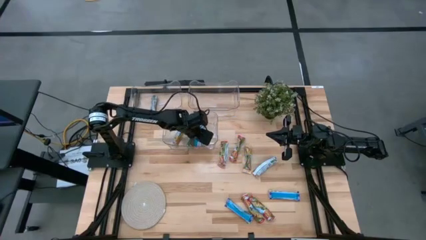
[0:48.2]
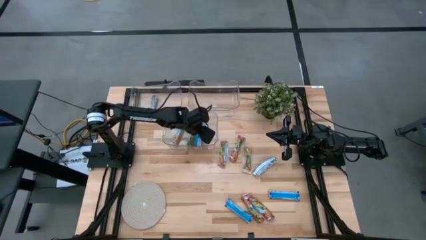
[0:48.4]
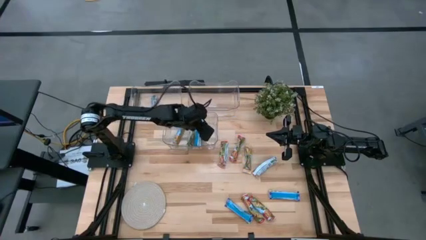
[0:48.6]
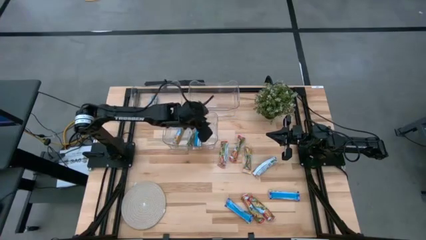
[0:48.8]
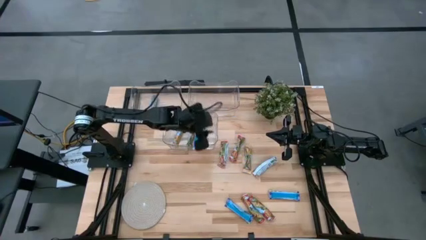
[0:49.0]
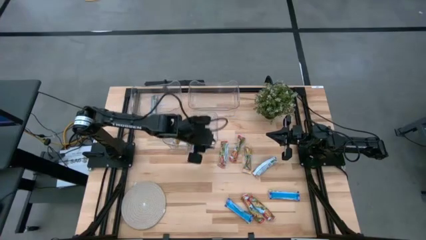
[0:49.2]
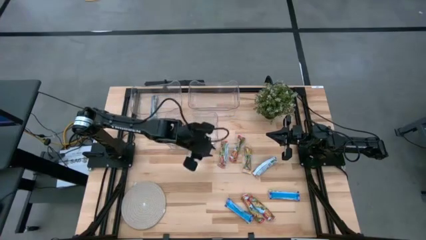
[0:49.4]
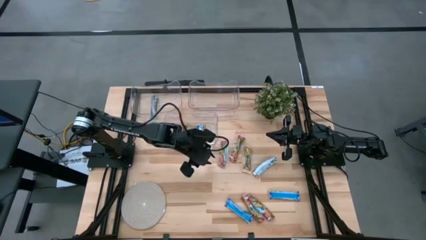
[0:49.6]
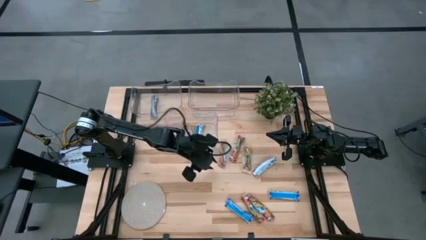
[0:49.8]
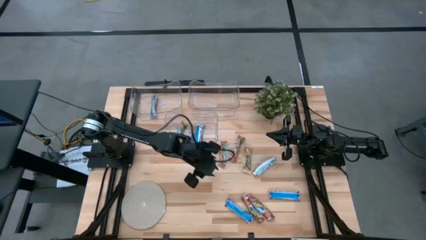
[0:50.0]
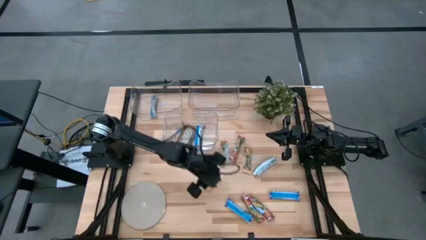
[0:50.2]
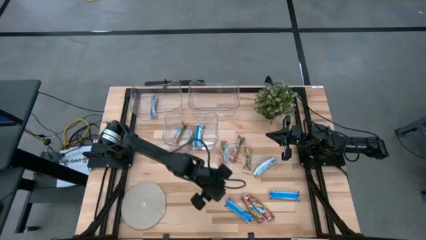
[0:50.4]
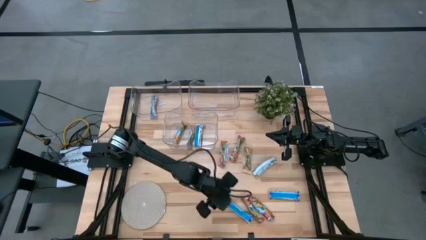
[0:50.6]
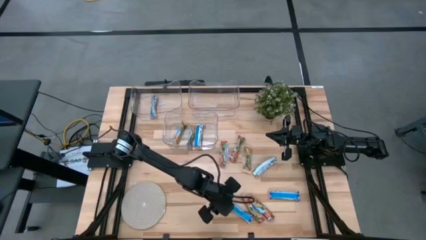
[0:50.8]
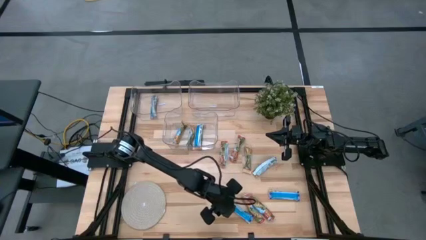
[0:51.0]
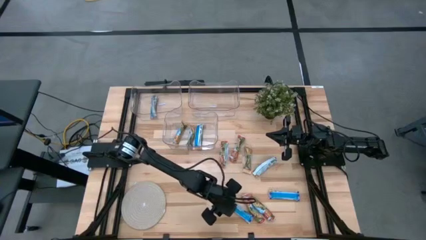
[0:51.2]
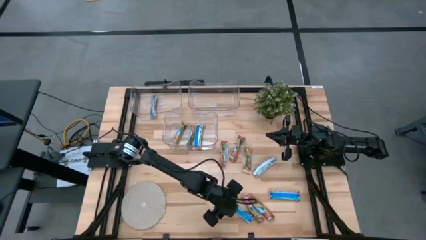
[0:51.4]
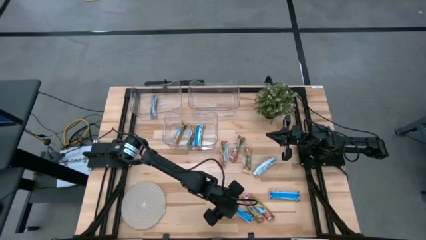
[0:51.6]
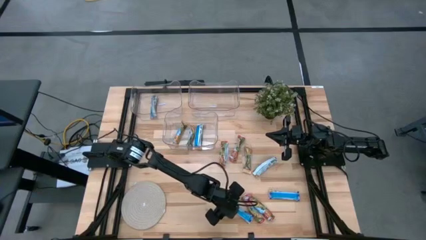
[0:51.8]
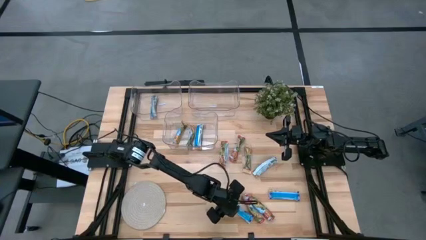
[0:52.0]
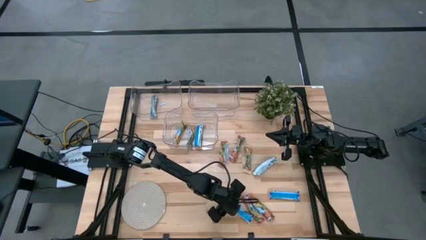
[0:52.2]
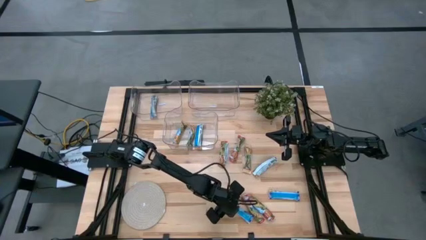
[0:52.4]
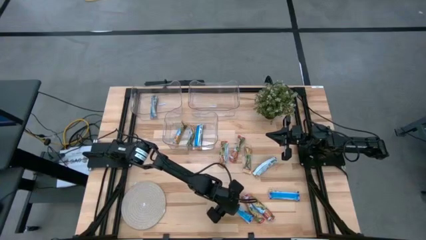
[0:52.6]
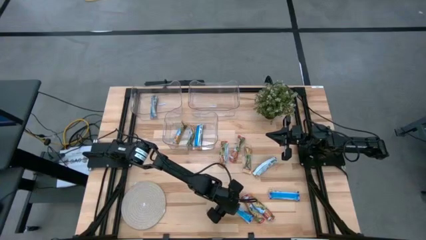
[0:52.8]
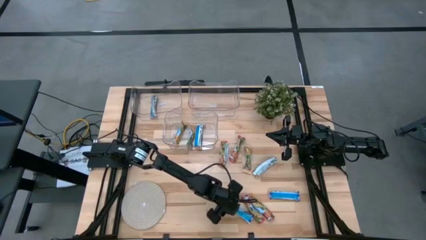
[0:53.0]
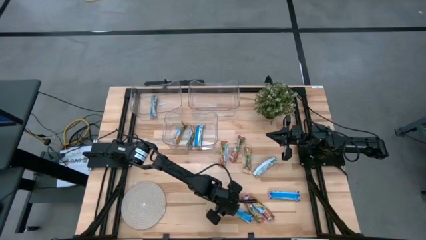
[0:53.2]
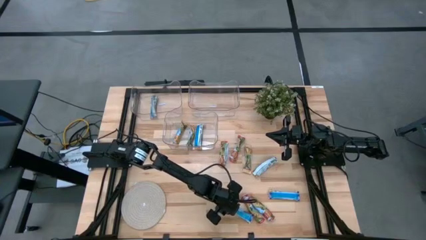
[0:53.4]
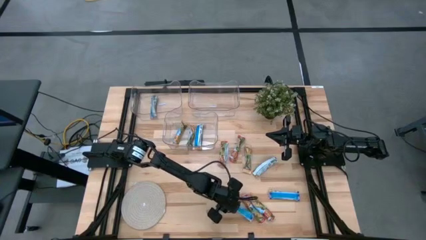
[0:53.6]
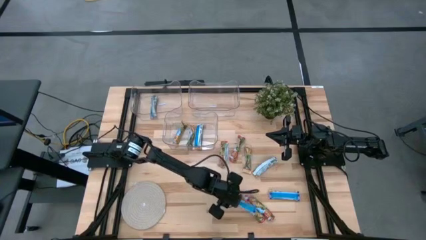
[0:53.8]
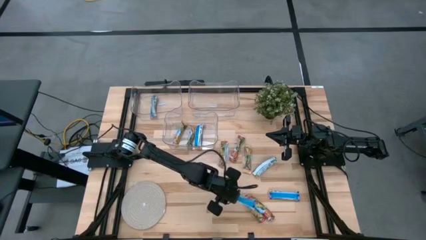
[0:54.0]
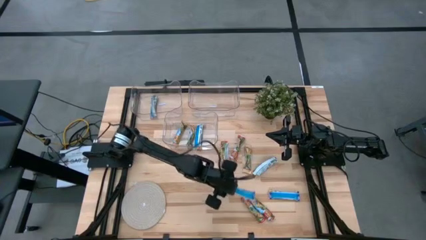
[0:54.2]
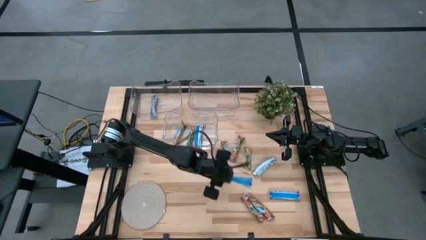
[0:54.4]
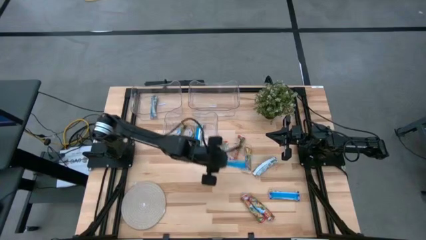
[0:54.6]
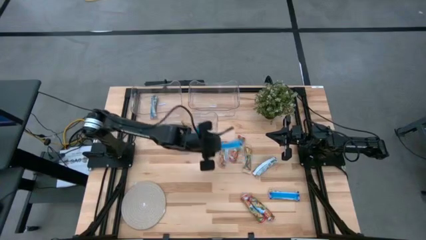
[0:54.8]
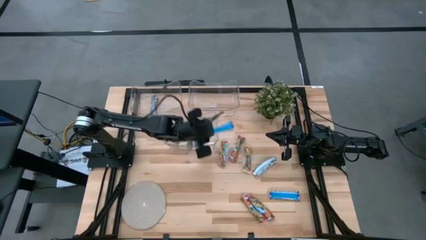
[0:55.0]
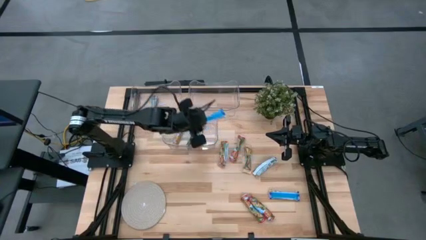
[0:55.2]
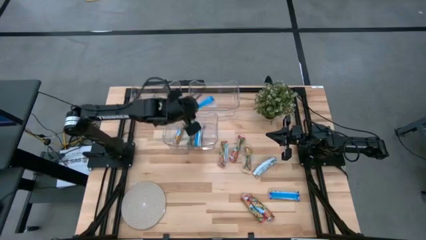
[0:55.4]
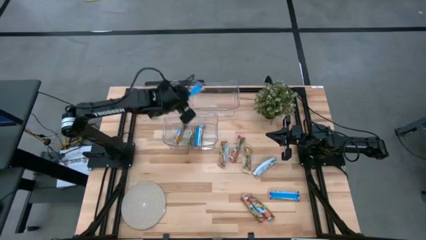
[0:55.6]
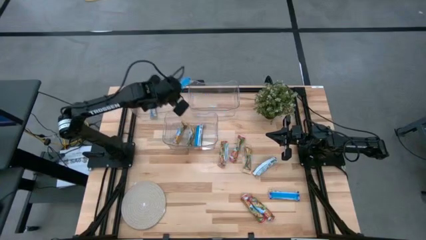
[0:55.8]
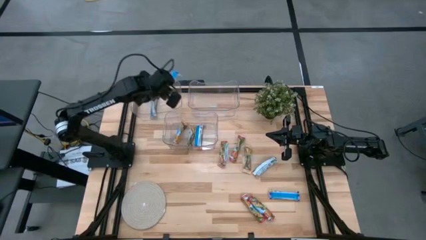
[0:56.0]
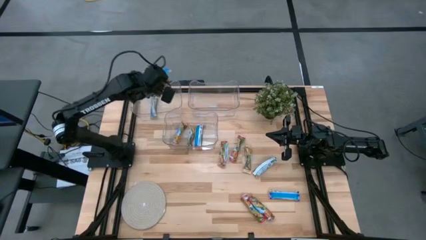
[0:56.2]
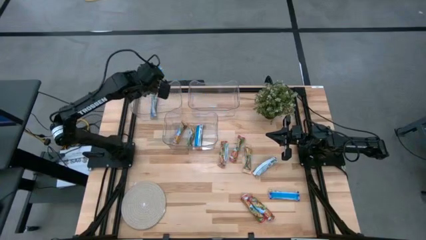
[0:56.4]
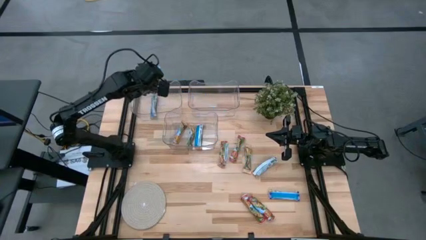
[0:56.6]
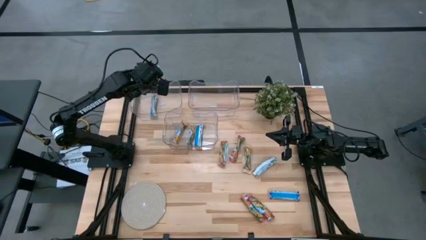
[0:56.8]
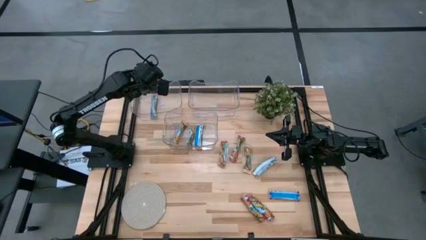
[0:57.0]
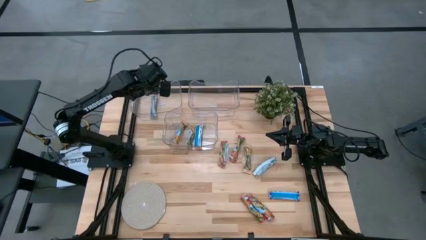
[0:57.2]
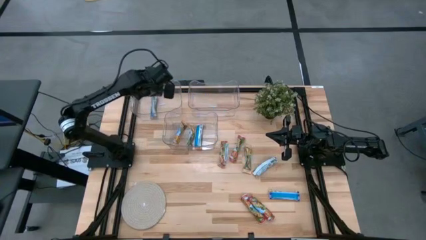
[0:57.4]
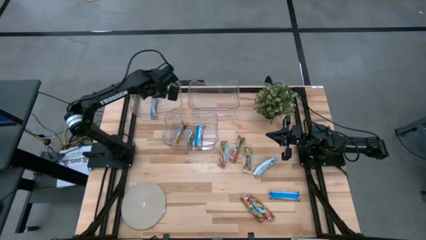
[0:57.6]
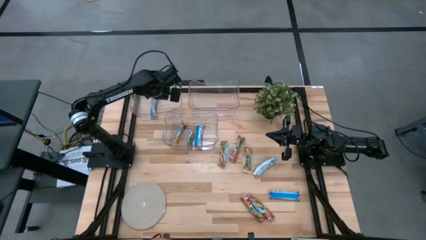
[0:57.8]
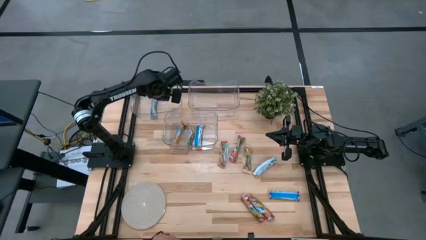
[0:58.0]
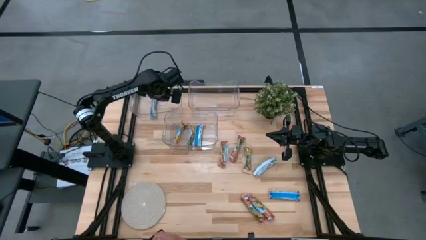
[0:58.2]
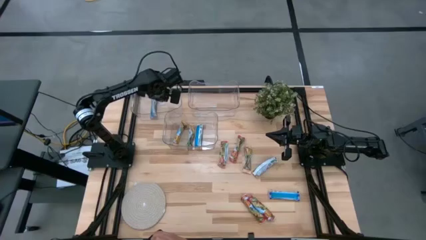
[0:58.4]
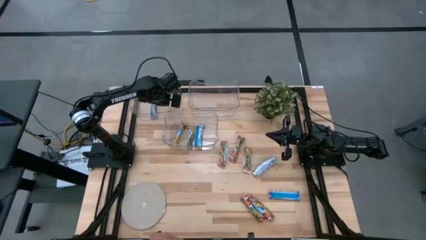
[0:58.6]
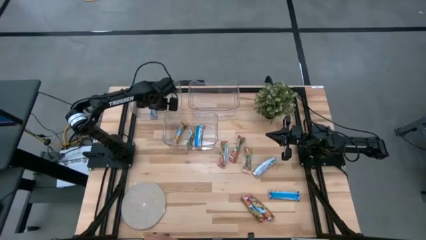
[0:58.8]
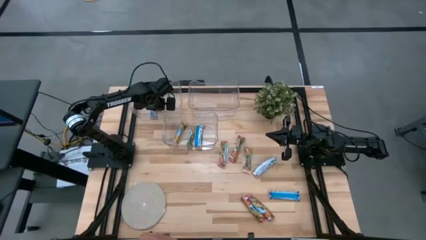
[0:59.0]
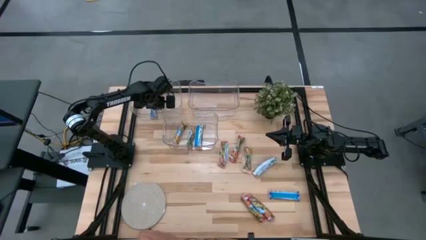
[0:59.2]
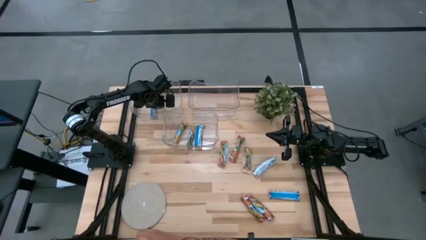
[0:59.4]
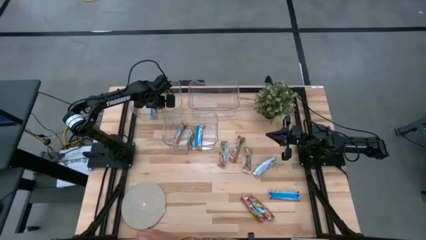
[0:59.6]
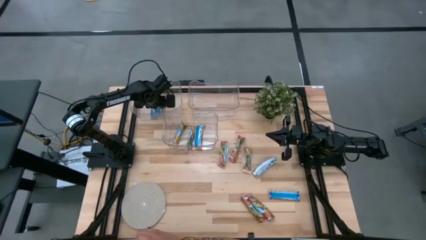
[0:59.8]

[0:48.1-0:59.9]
Task: Pick and place Granola Bars by type
Put the blue granola bar into the top left transparent bin
